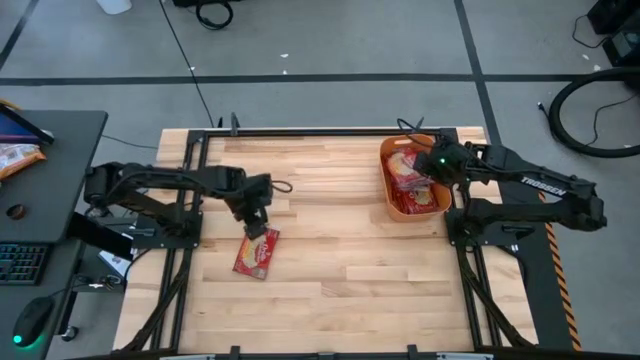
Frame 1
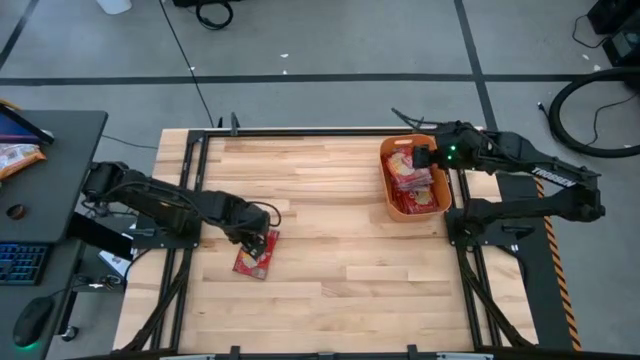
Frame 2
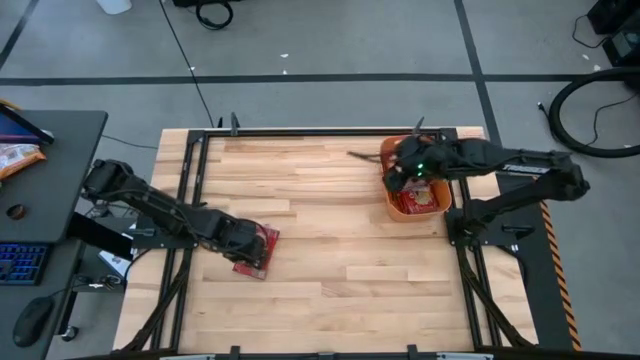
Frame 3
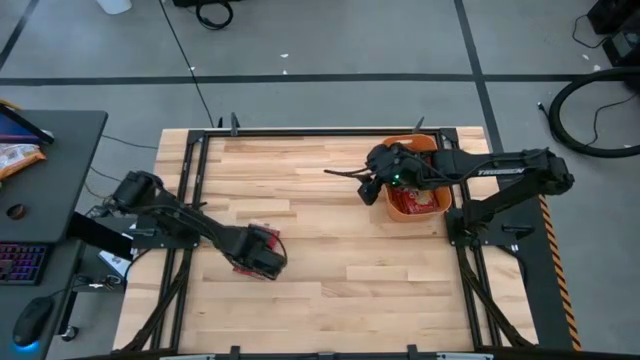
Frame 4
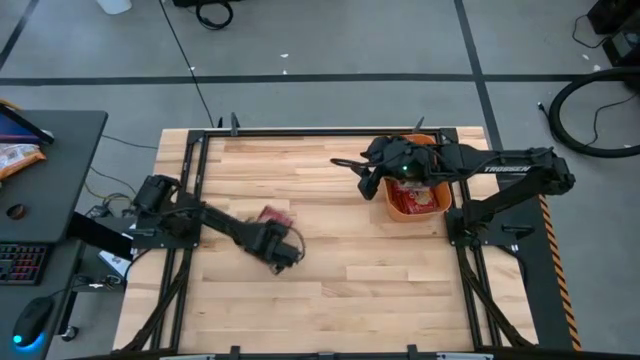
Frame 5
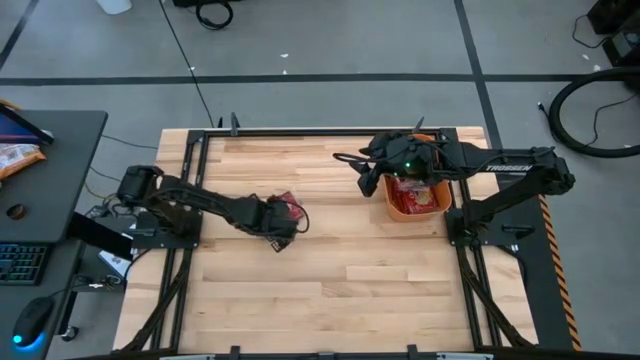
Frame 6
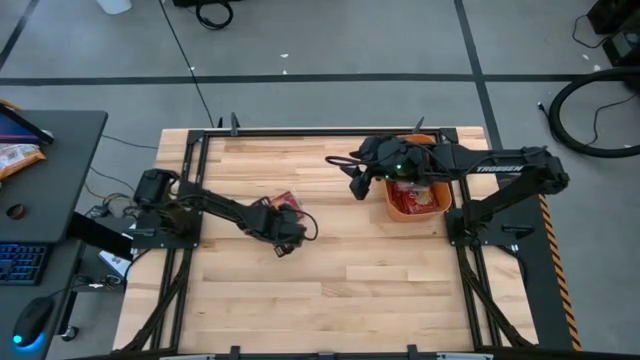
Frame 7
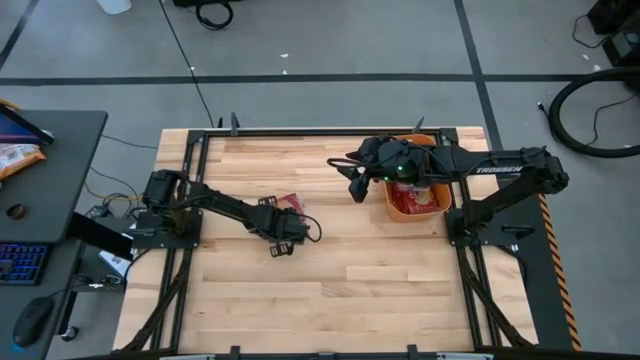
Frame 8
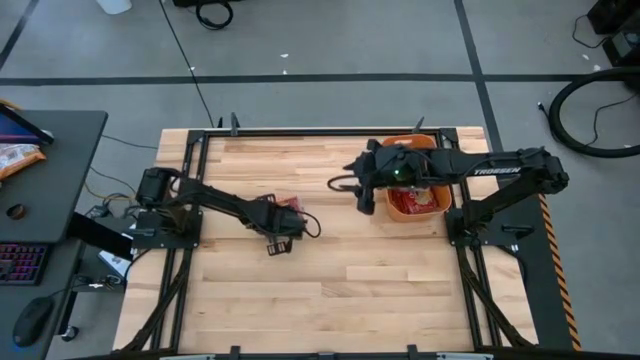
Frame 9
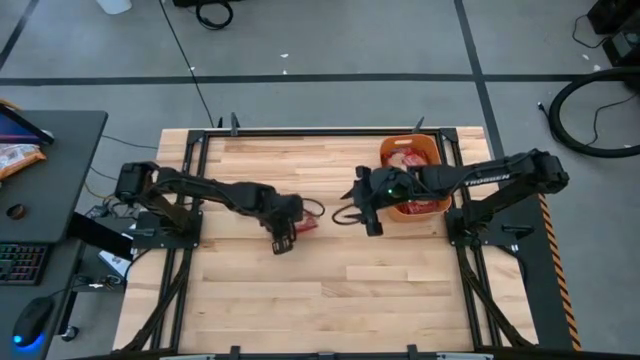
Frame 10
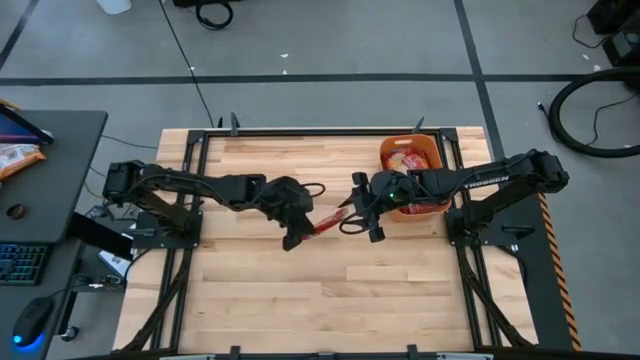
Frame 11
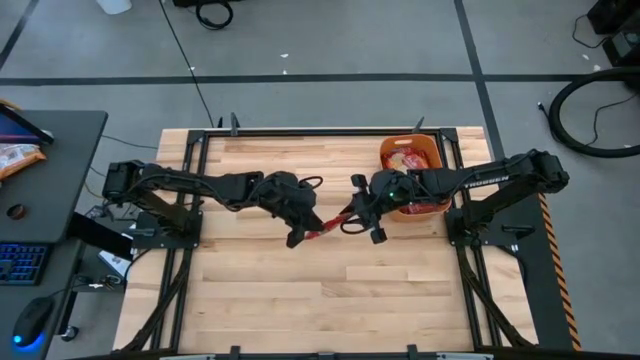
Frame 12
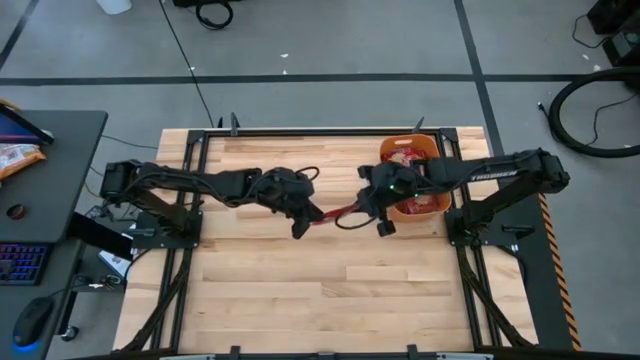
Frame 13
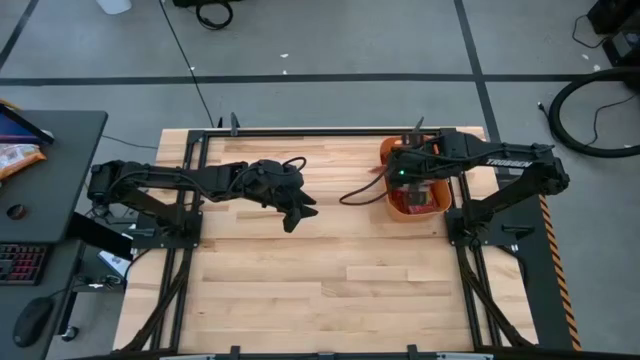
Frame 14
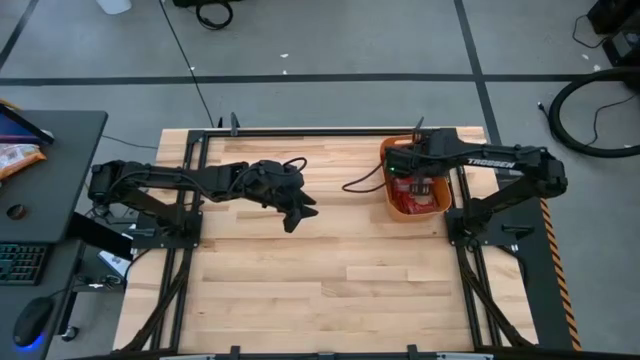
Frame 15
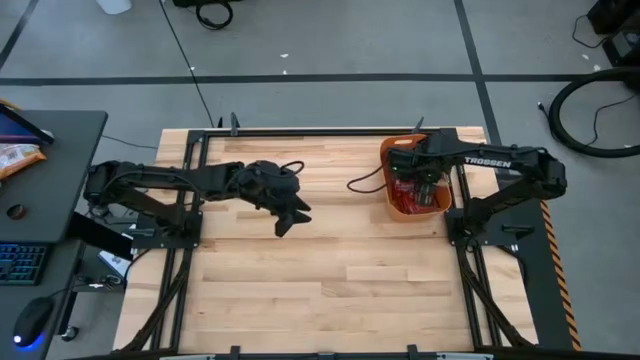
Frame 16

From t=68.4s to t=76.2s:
Task: Sort popcorn bags into baskets
Put the red popcorn bag into the orange bin

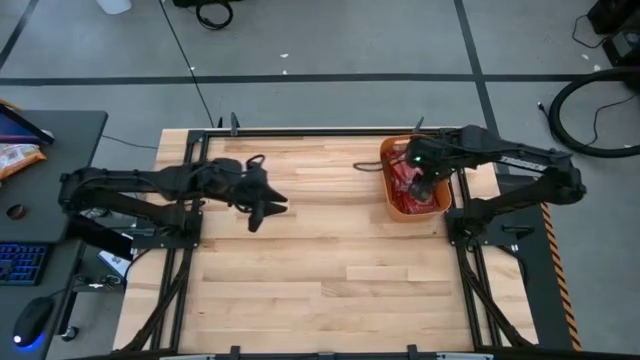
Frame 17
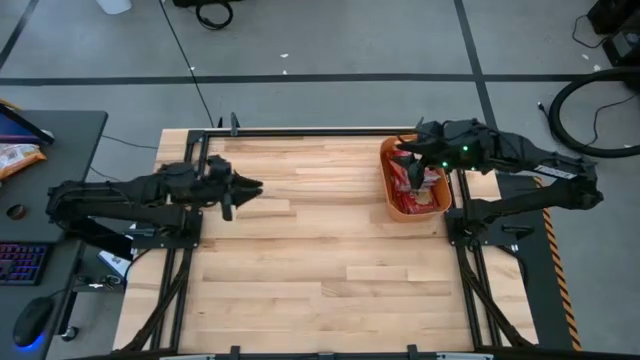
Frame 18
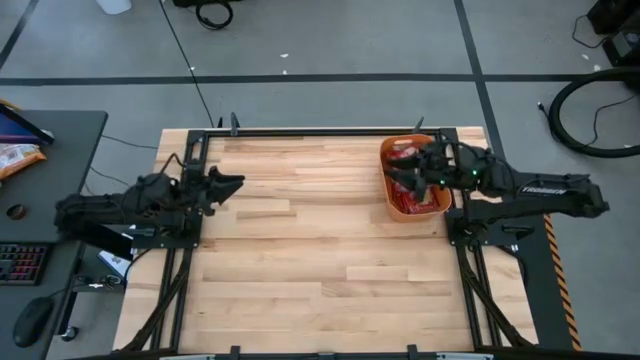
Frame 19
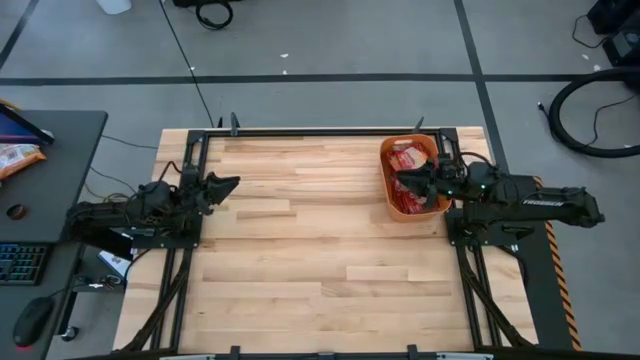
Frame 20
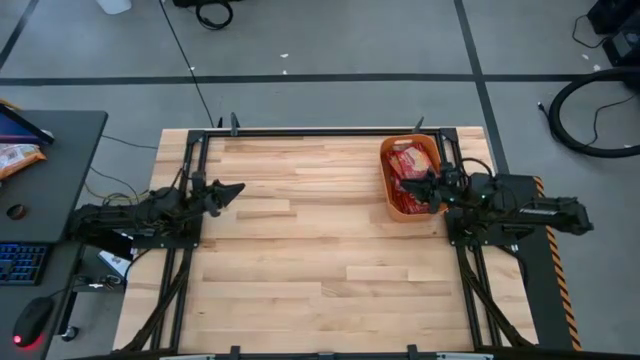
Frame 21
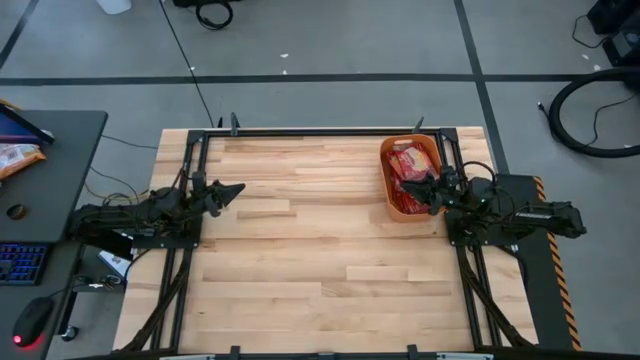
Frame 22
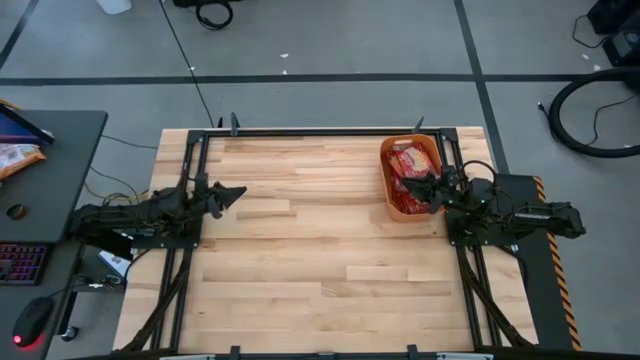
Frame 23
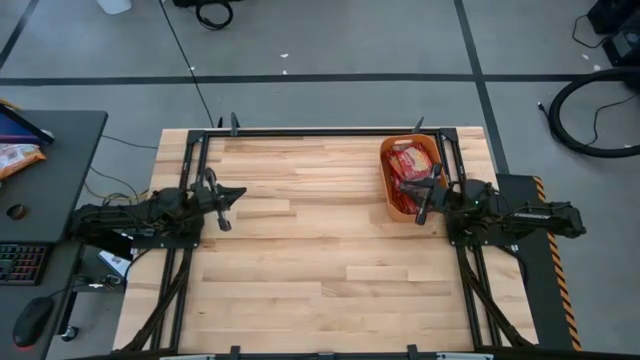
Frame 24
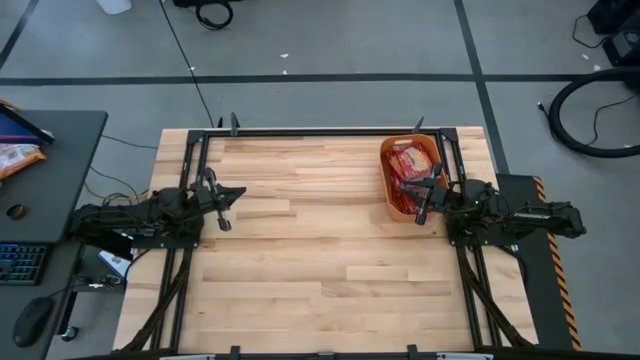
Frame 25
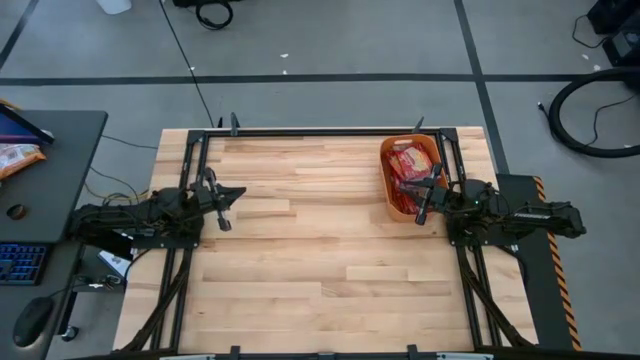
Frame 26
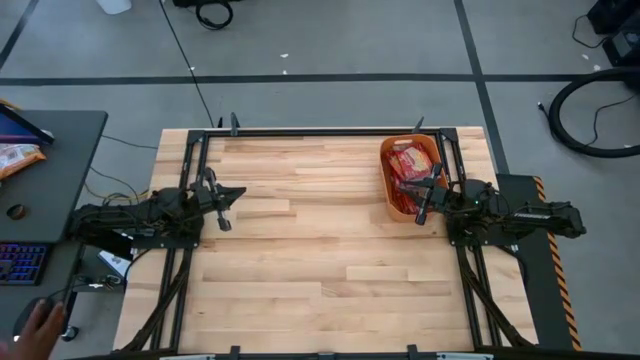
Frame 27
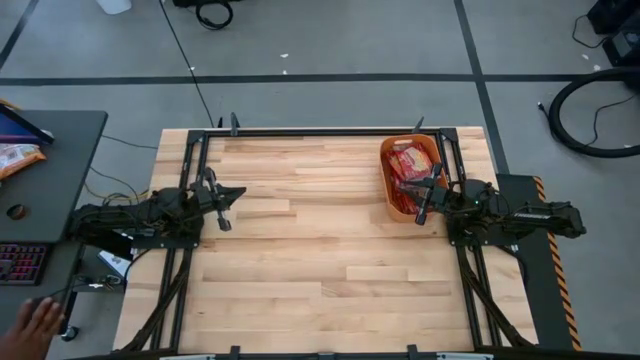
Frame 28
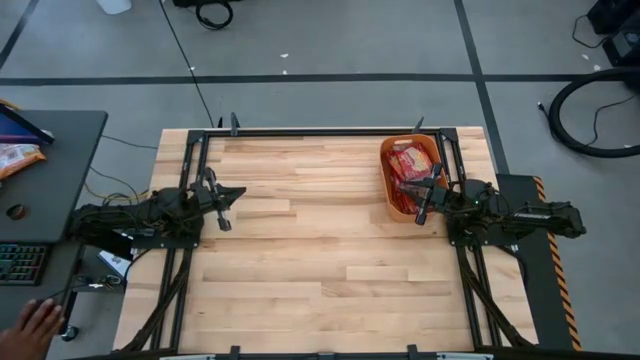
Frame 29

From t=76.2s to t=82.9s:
Return to Home Position

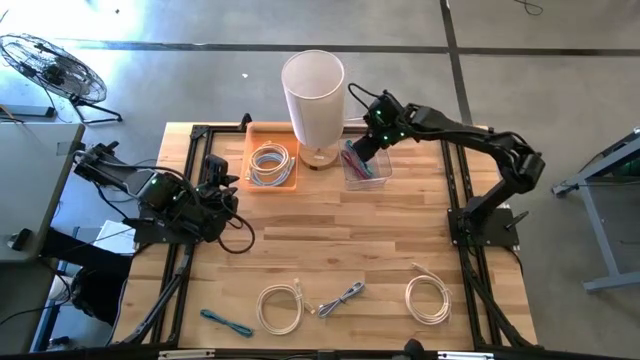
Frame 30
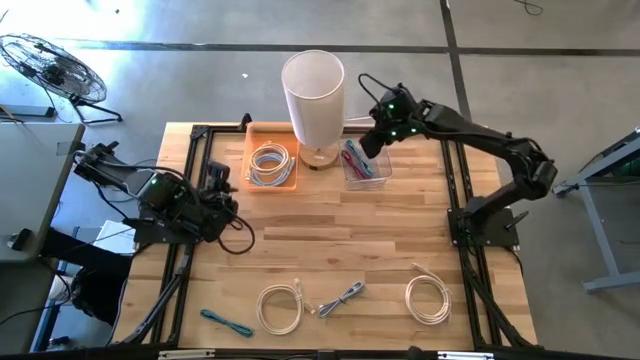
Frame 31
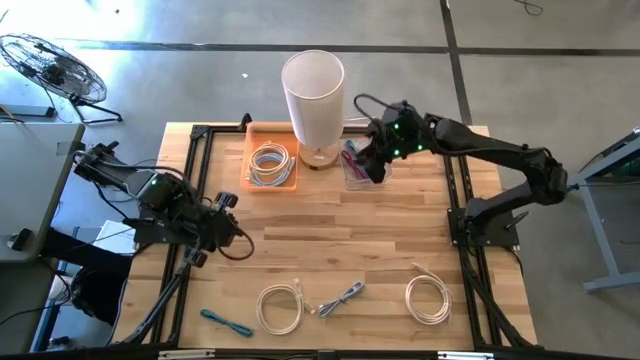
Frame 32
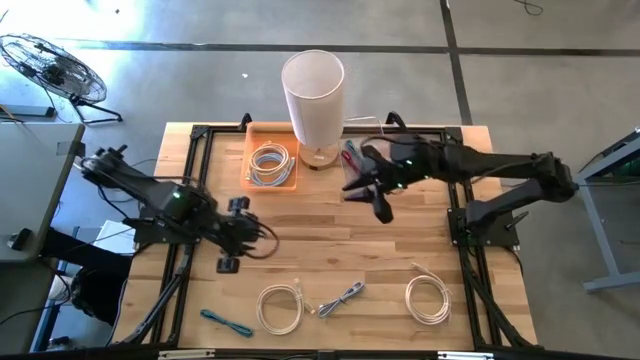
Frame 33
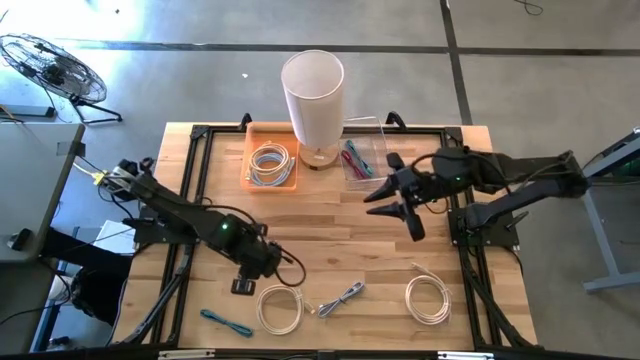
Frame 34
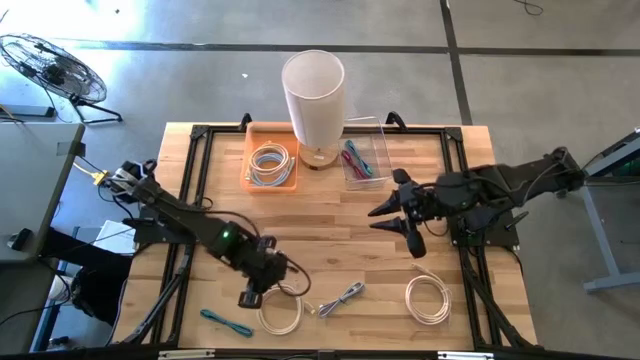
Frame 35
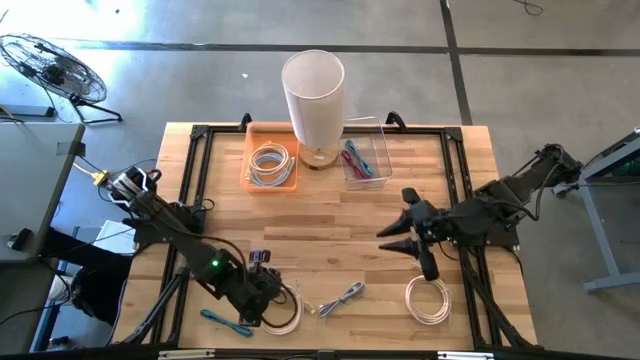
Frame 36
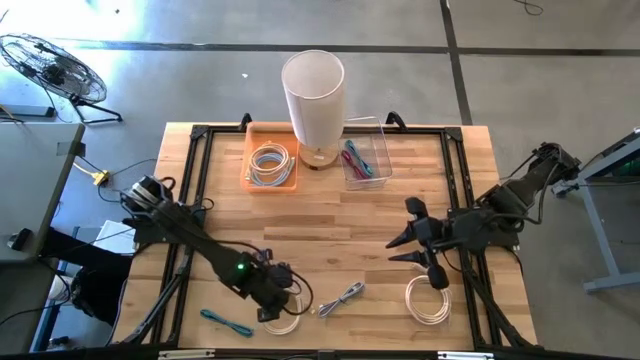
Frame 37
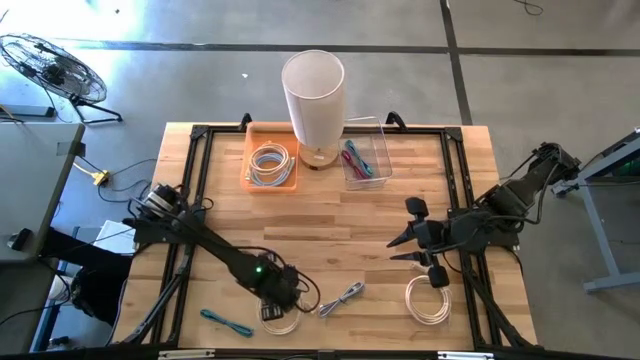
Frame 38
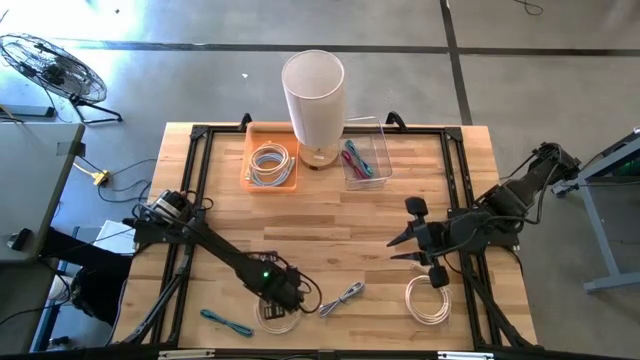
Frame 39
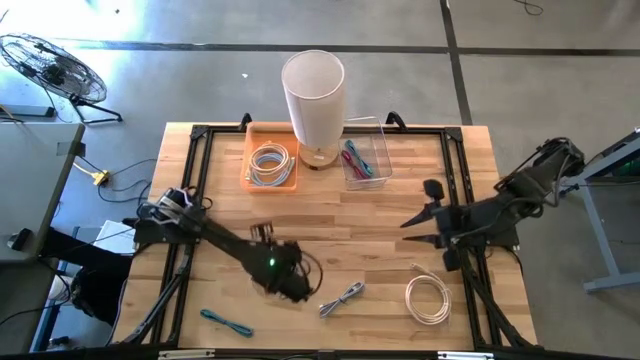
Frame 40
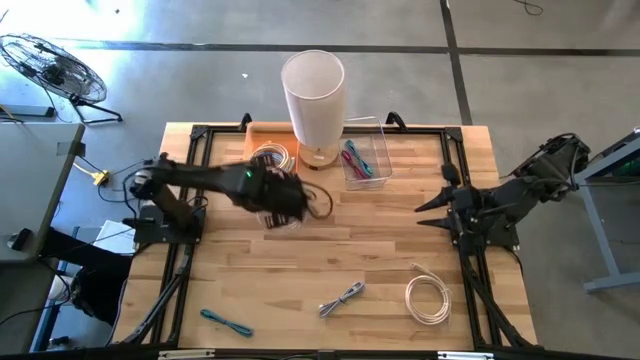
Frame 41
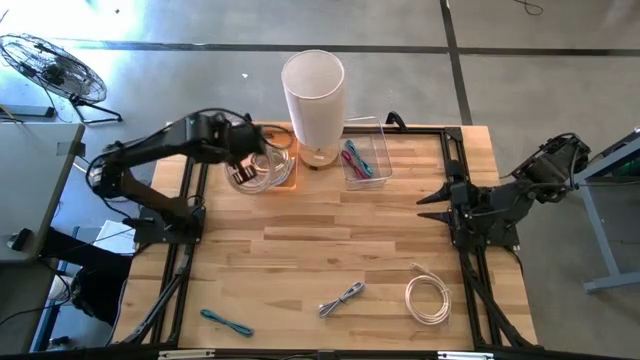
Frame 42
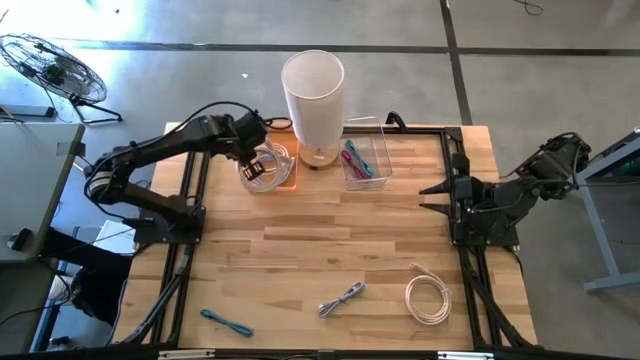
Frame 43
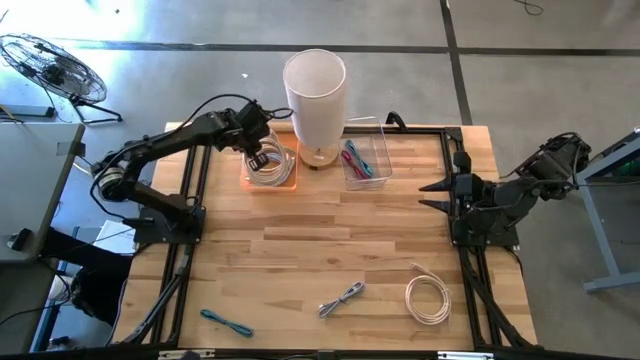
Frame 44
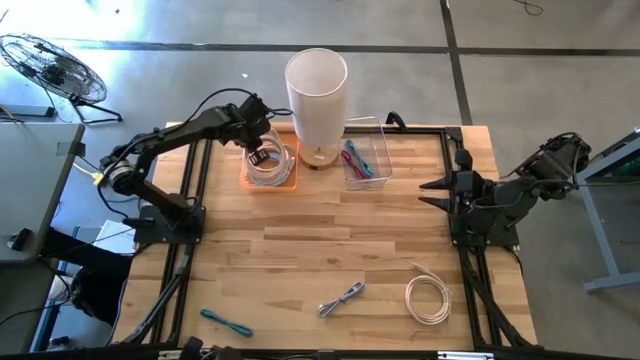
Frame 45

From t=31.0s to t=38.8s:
Task: Pick & Place USB Port
Put the left light brown HDMI cable into the orange bin
